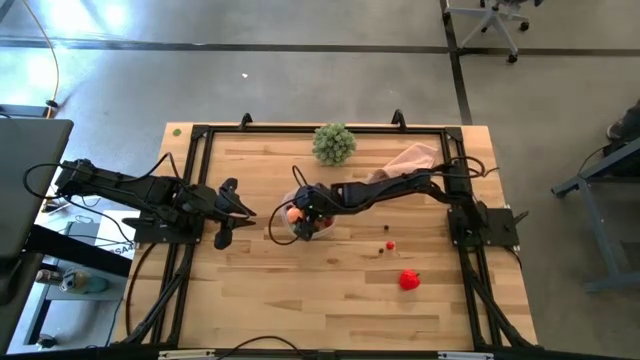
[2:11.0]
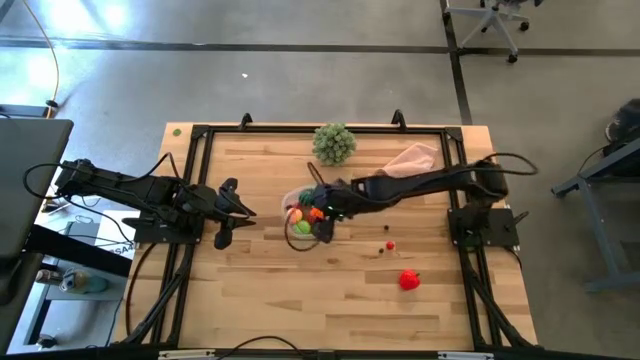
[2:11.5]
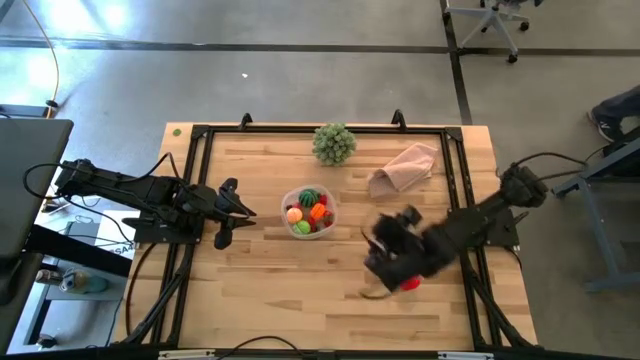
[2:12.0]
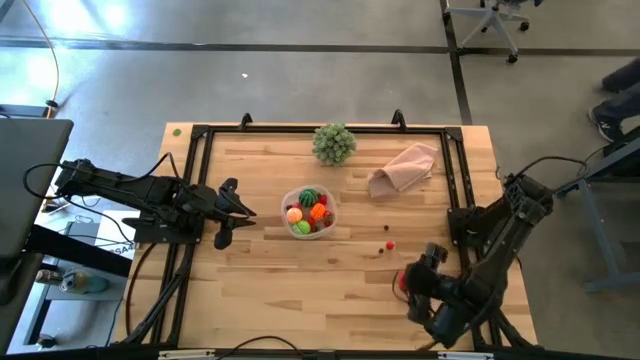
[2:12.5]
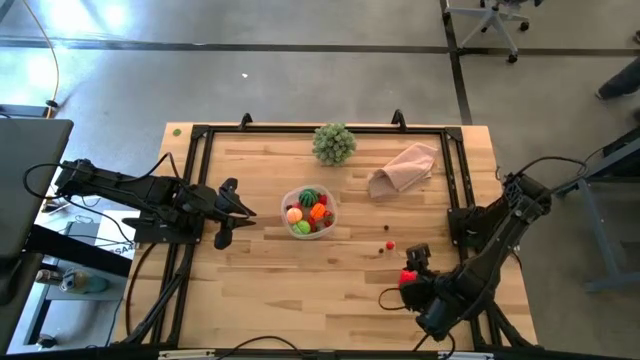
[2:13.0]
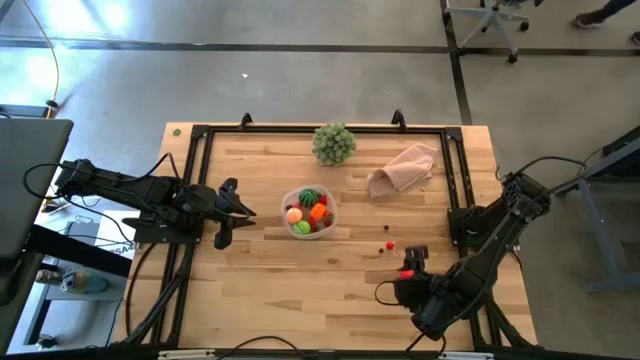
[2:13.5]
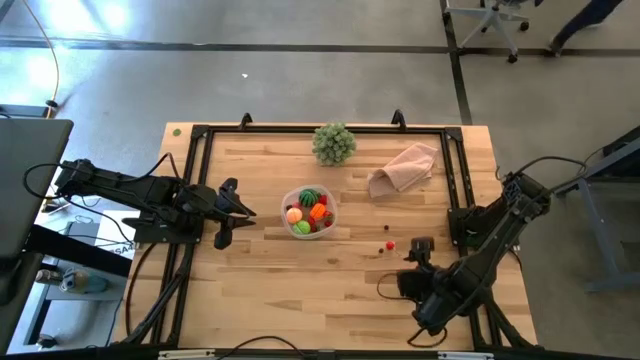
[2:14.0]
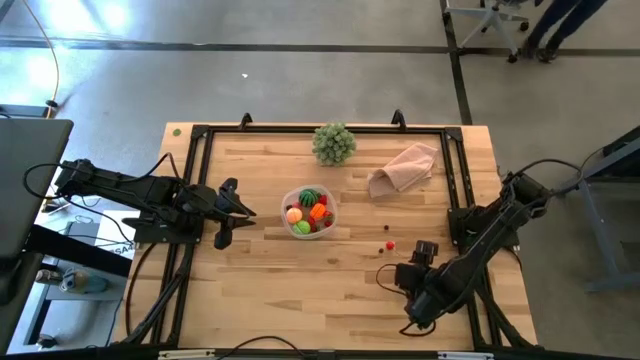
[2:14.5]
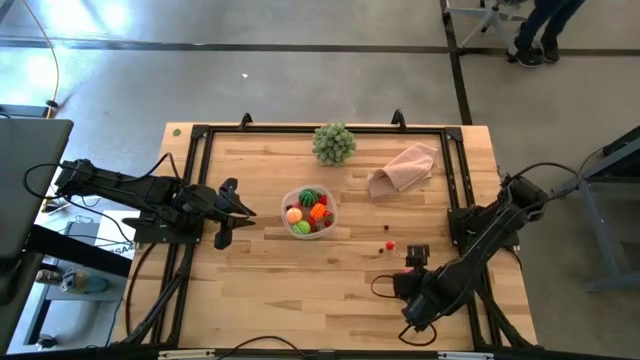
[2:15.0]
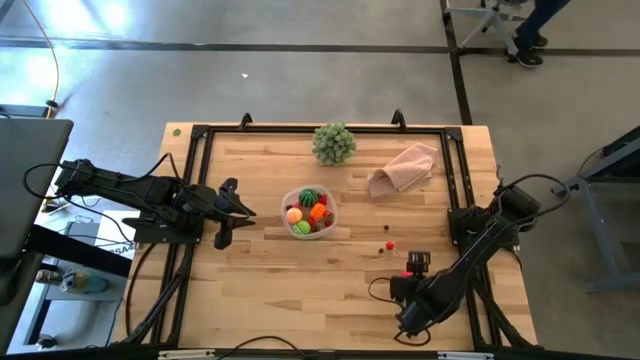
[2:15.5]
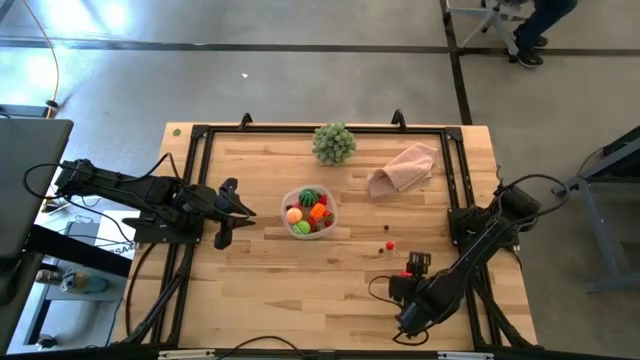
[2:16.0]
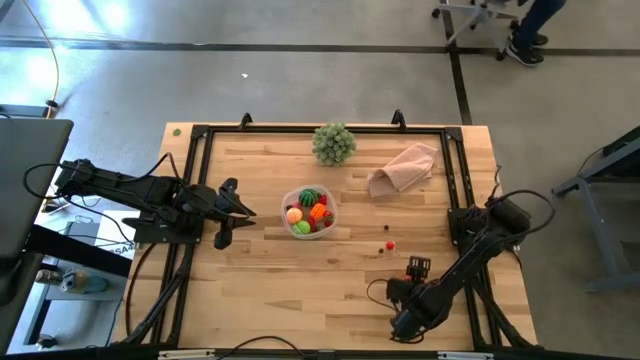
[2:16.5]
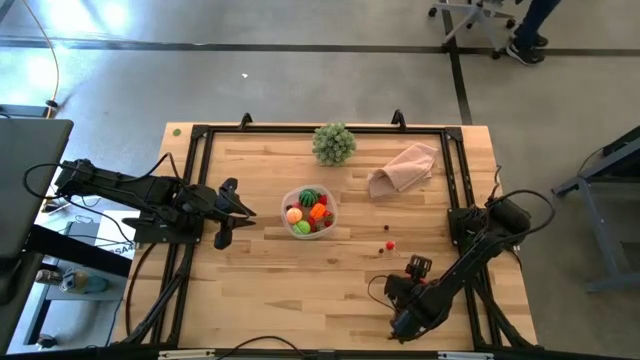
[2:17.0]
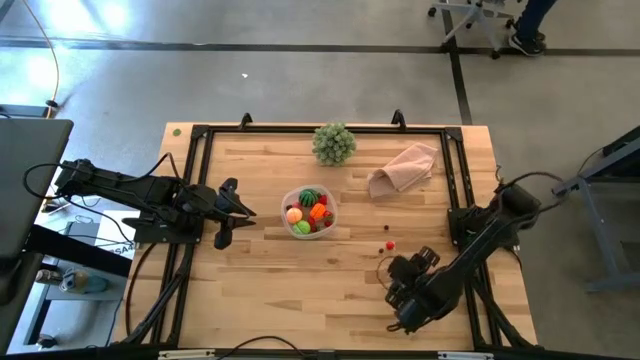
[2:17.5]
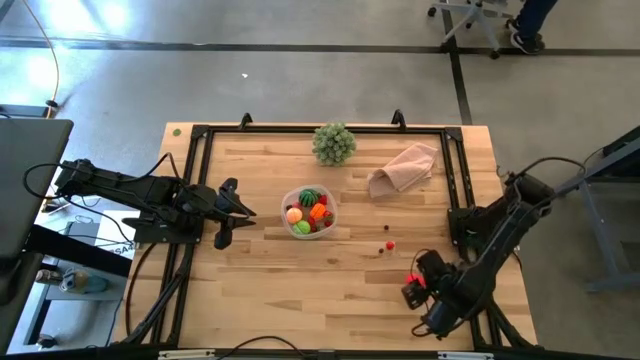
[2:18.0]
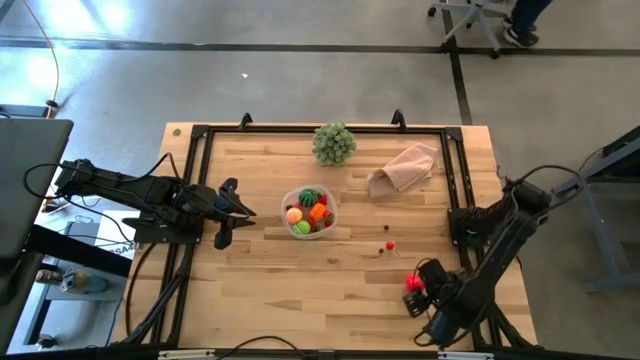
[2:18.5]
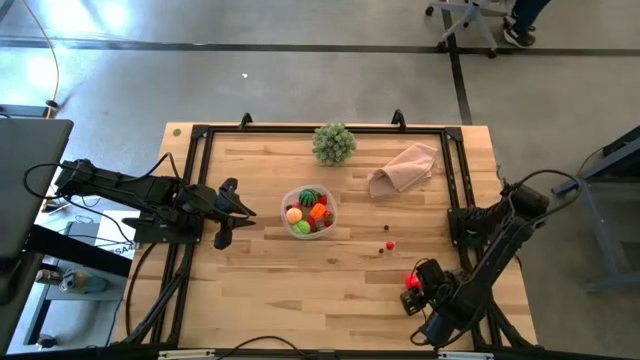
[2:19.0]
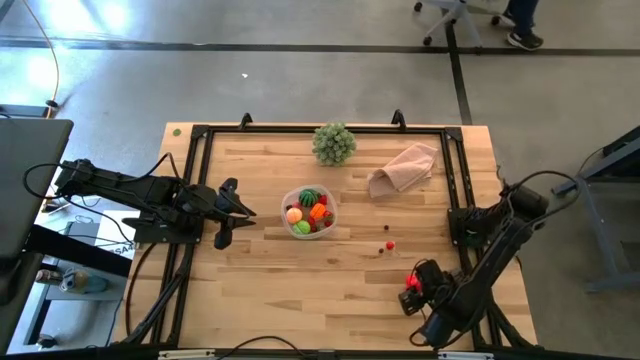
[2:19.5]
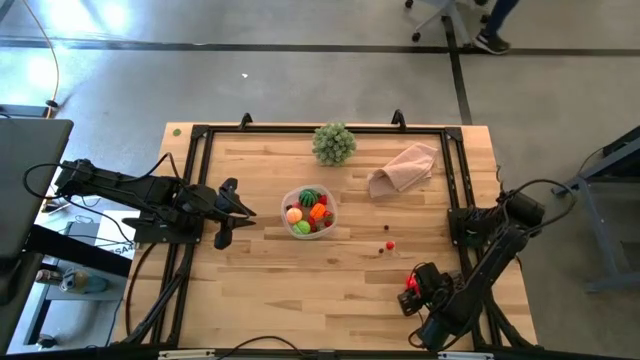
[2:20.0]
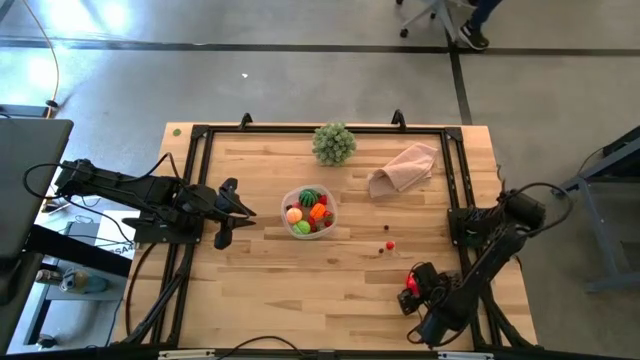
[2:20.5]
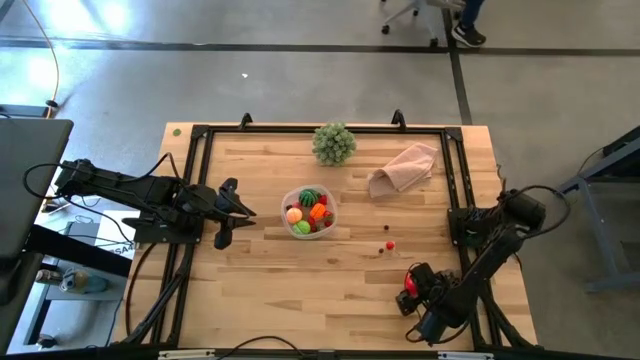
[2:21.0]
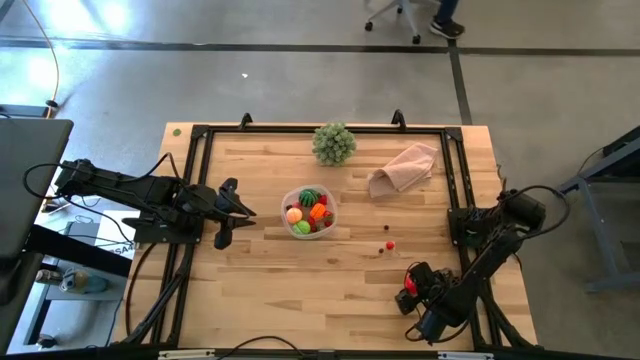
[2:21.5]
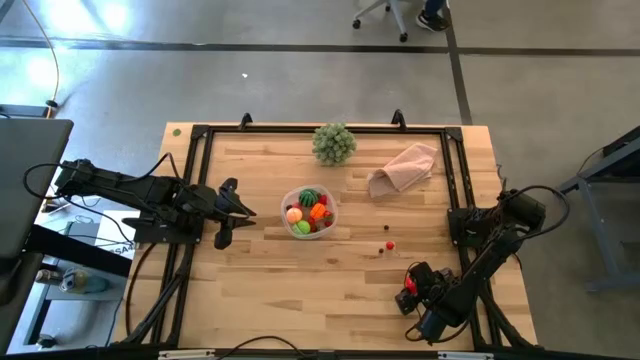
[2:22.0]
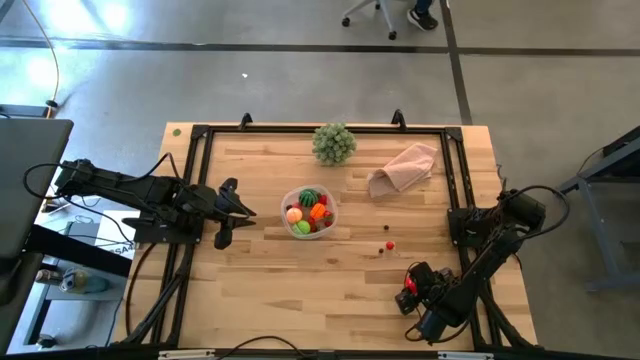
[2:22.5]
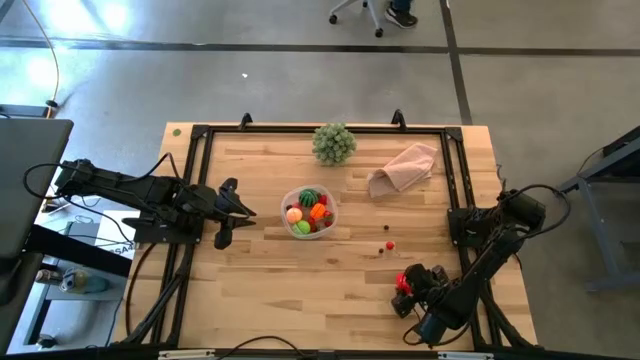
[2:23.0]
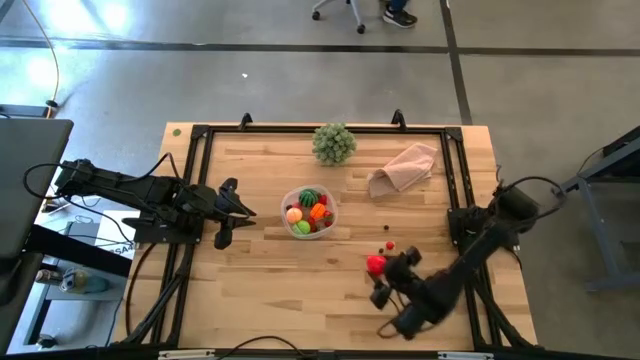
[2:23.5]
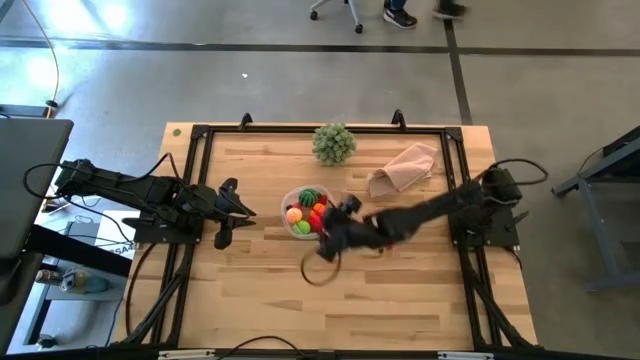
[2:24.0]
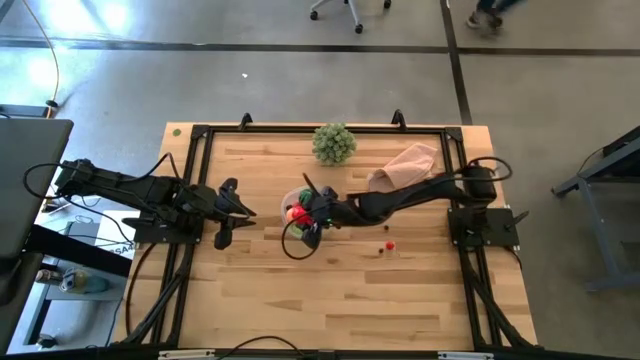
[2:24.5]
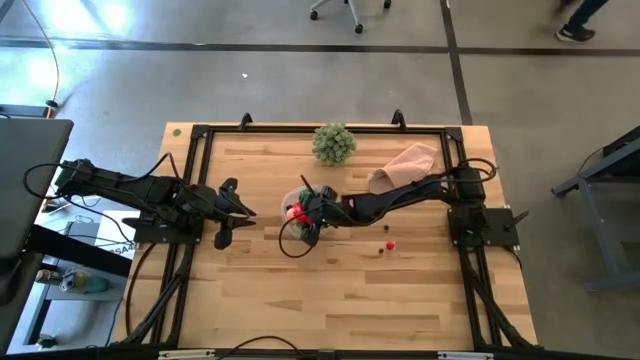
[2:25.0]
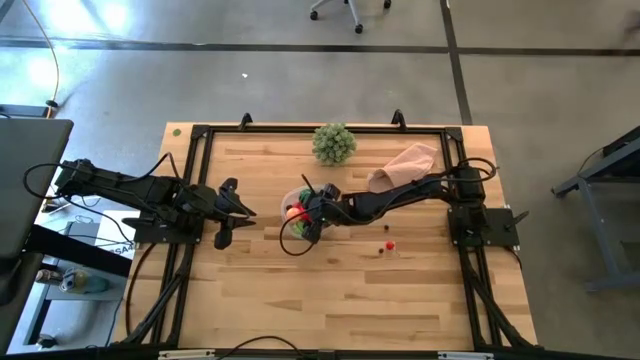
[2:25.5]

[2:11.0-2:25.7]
Task: Pick and placing Produce into tupperware
Put the red apple into the transparent bin

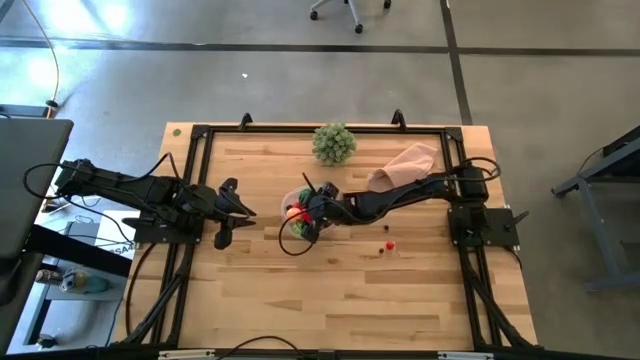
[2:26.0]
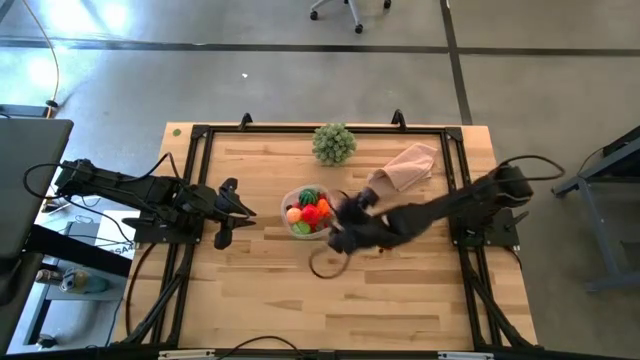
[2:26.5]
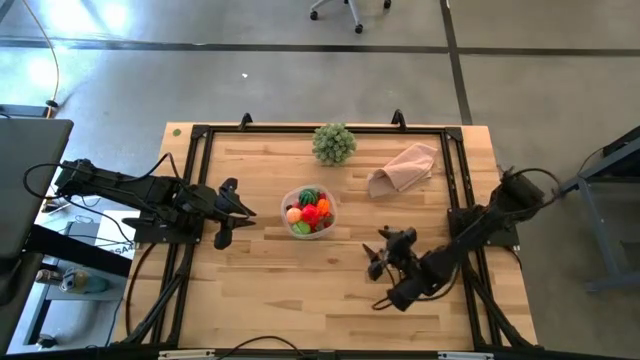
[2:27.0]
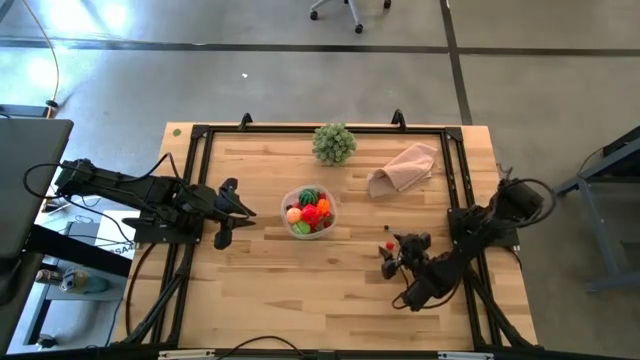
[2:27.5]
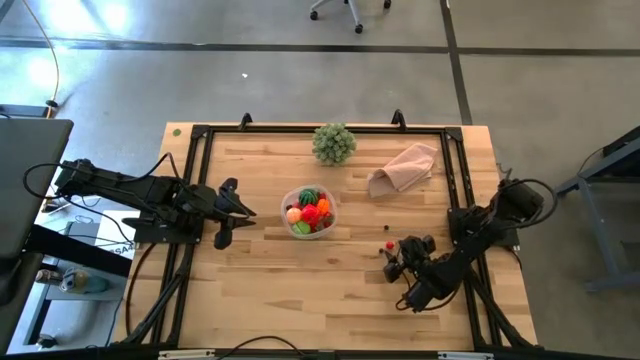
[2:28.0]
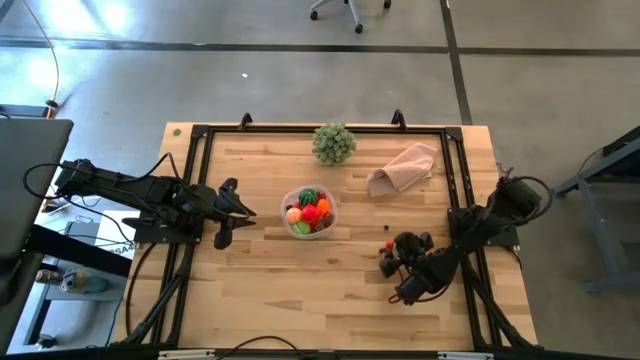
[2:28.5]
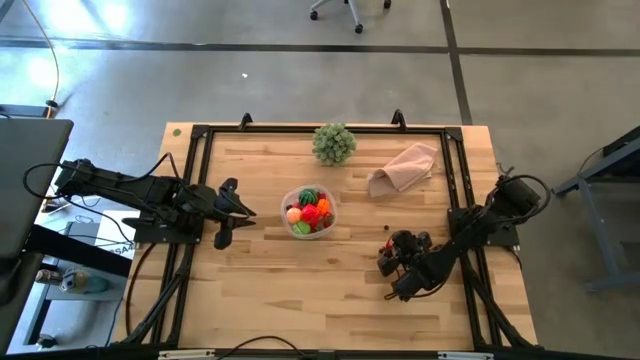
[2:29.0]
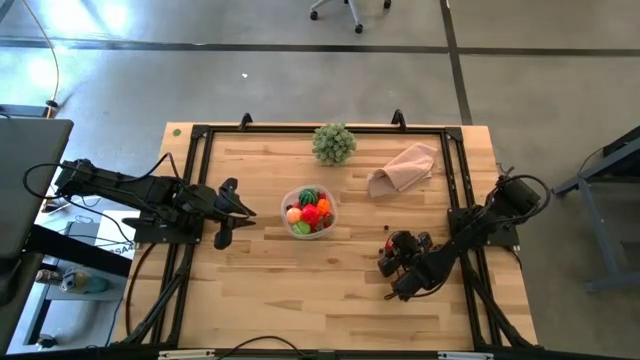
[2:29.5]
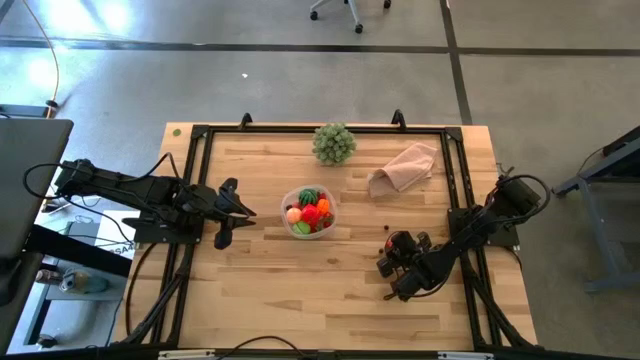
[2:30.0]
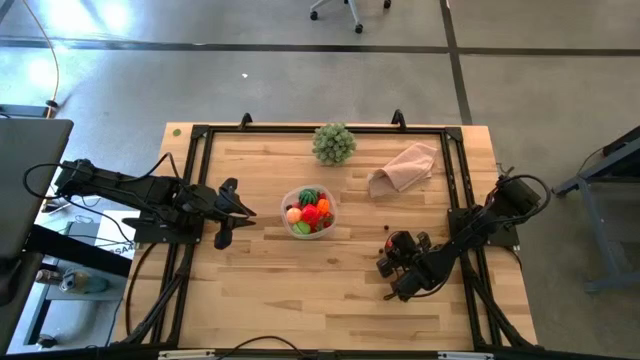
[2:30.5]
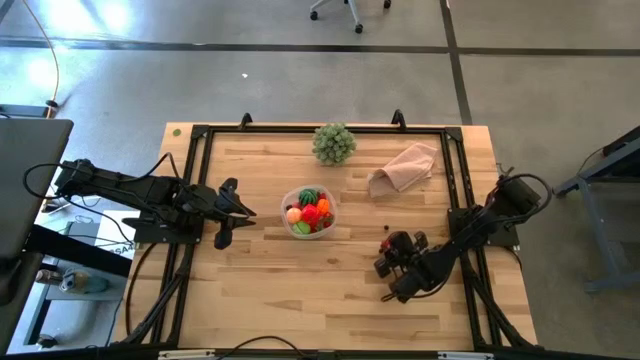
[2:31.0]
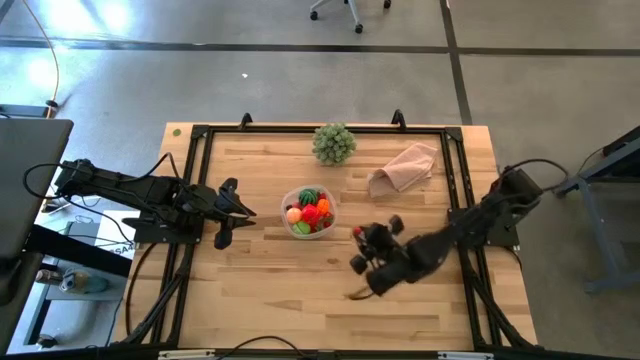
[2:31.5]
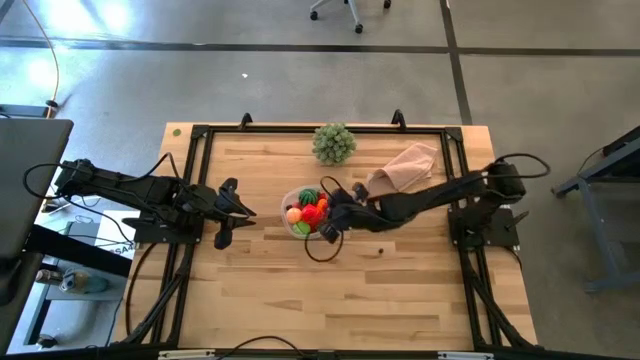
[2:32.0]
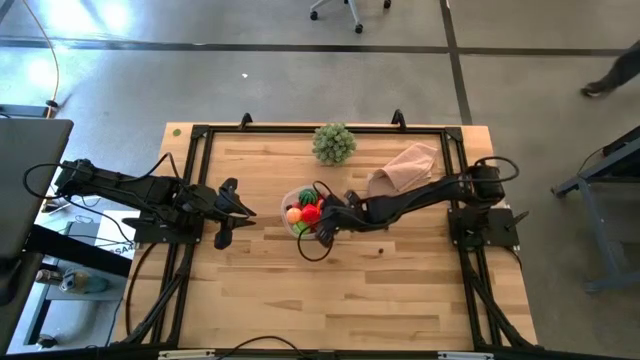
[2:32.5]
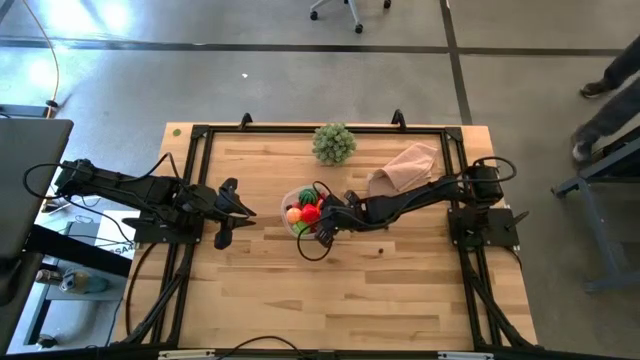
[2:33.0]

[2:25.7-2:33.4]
Put the red cherry into the transparent bin
